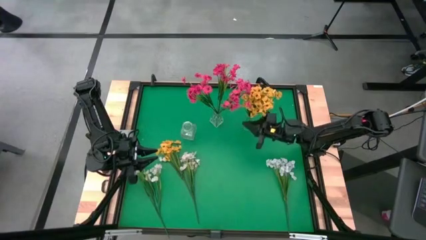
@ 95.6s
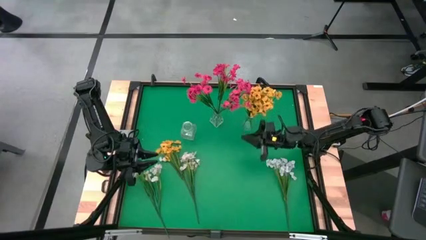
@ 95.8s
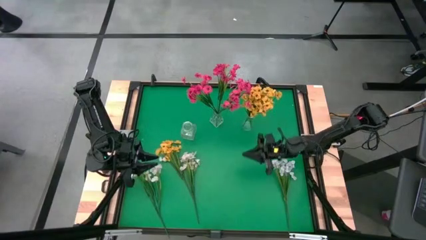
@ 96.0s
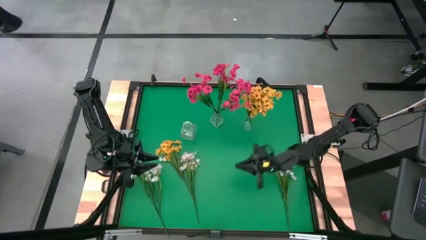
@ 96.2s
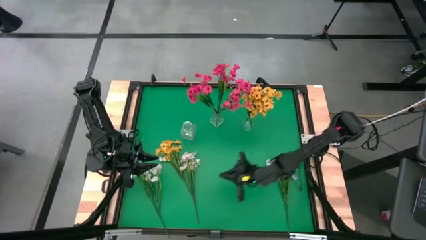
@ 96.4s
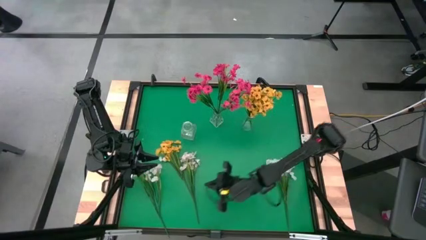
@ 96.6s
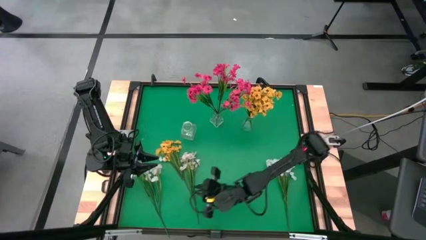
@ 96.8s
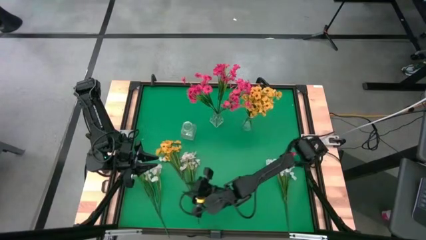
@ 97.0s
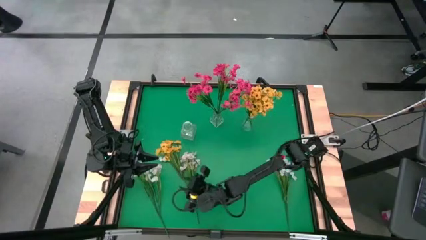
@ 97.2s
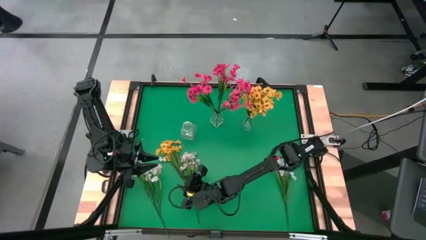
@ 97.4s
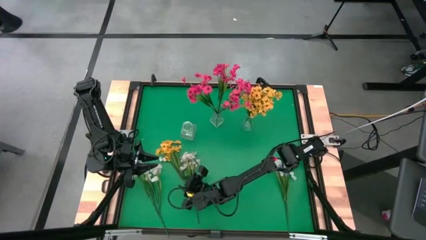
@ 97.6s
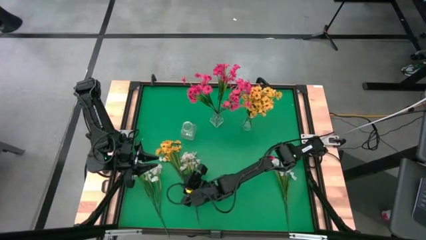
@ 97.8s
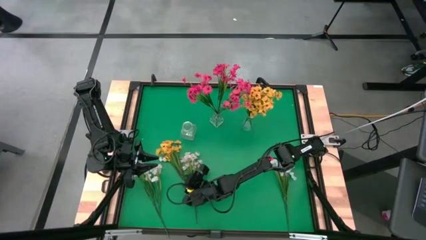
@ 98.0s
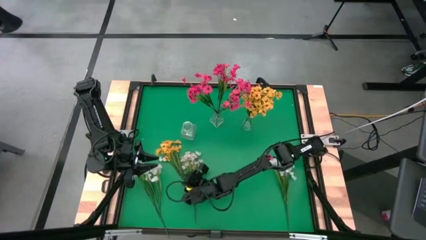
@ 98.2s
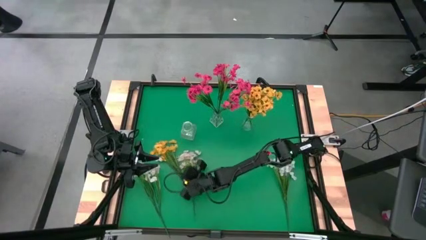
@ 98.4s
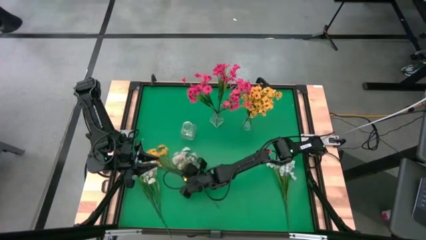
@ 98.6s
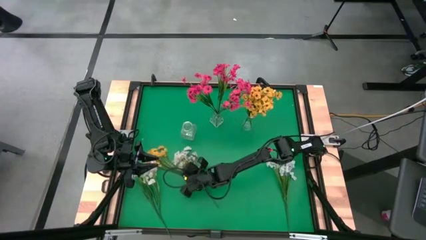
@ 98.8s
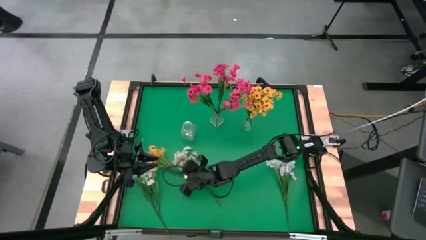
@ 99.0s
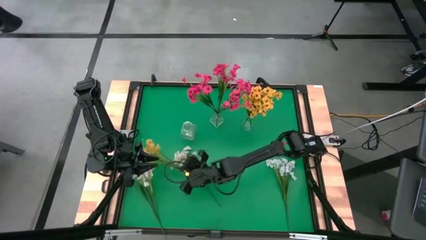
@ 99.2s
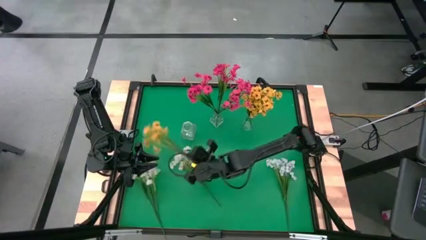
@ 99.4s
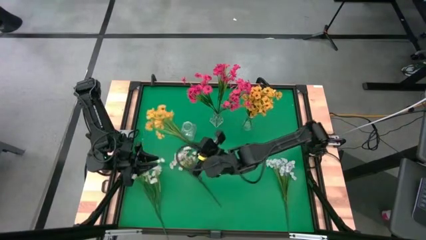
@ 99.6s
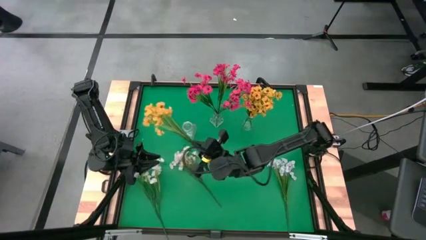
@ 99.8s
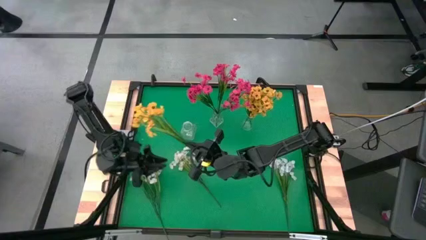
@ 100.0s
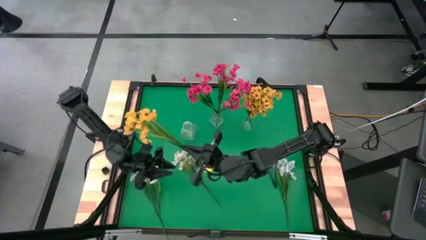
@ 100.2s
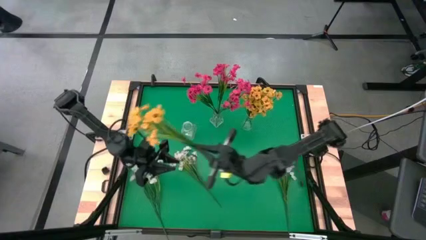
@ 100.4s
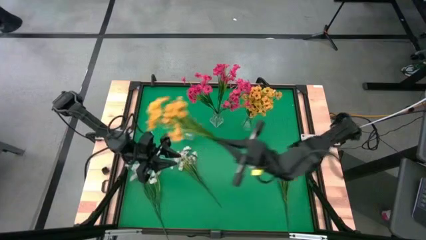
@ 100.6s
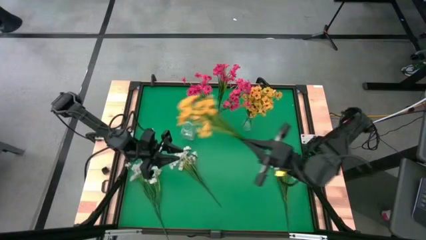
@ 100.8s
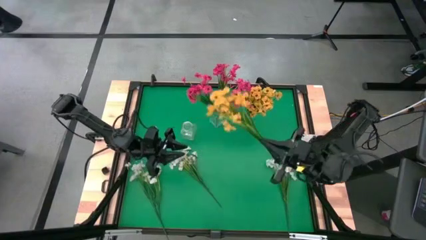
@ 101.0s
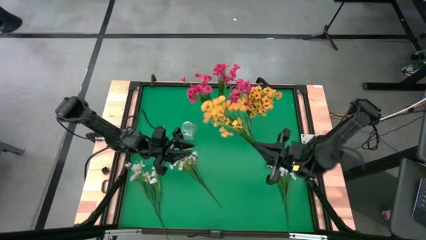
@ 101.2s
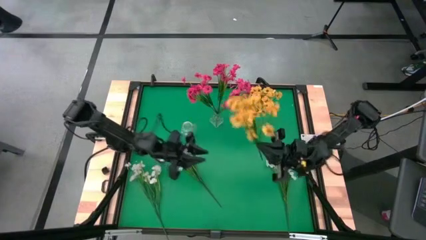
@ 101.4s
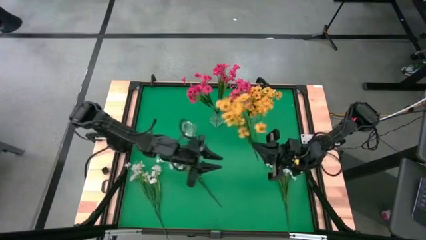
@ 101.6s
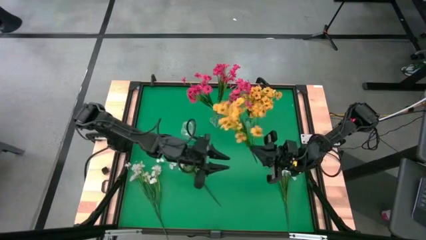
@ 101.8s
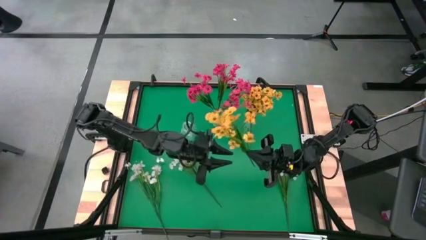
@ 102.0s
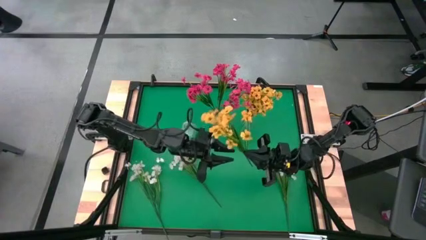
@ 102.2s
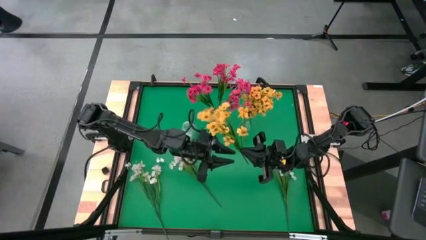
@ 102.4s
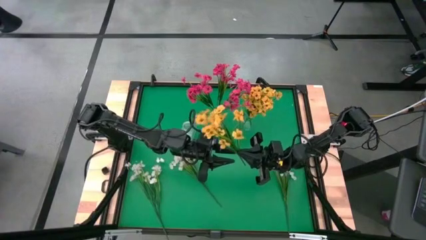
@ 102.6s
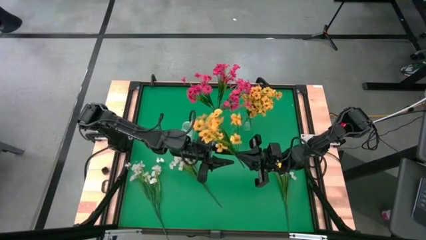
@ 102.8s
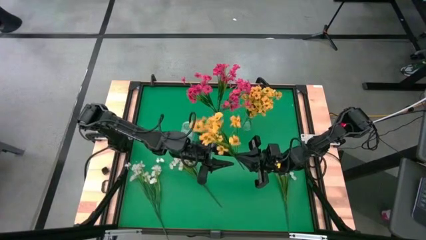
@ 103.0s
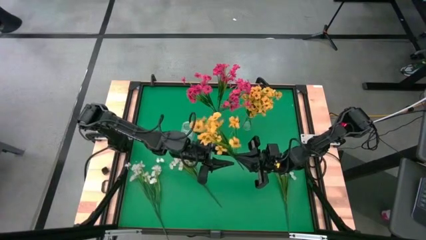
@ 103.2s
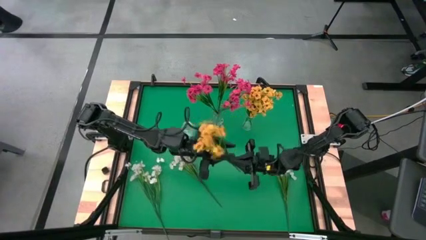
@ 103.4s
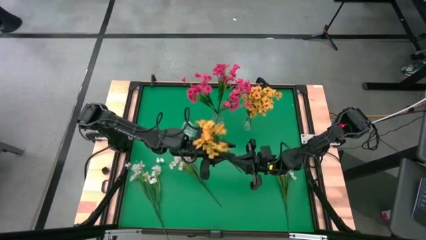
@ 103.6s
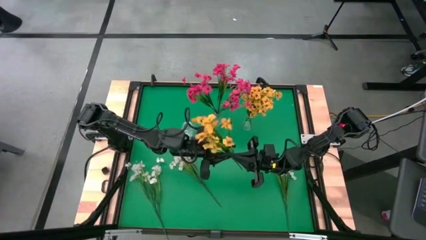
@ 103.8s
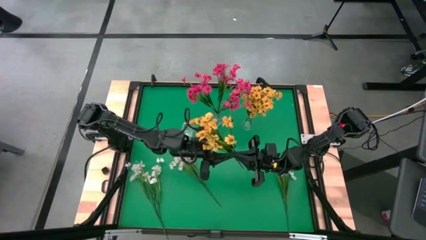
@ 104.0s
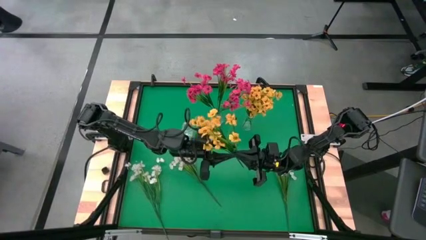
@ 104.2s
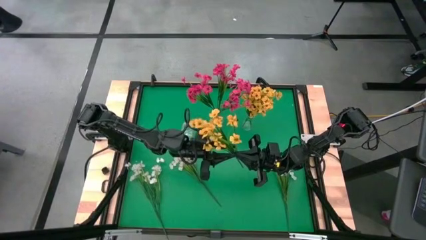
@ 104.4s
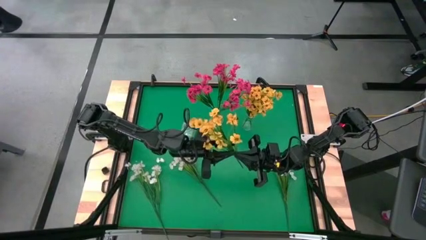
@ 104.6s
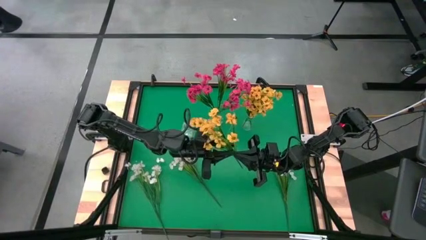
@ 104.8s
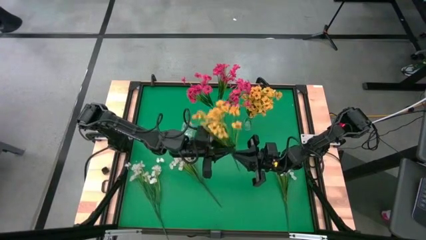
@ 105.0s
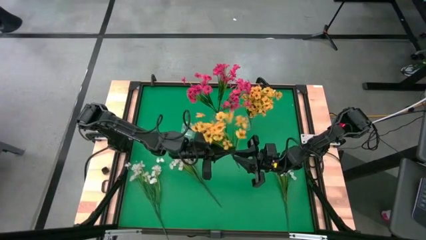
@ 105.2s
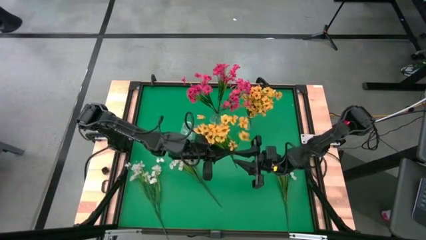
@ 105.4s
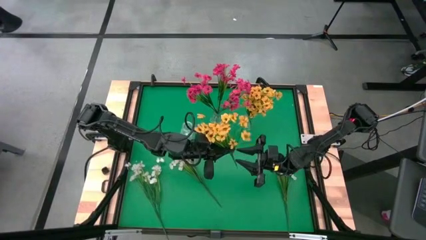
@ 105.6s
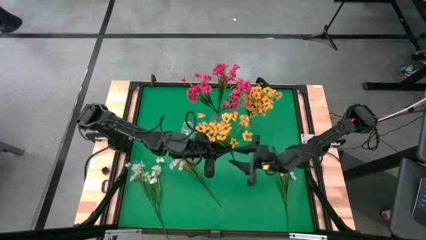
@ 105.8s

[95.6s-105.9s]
Task: Sort flowers into vase by color
Put the yellow flower into the right transparent vase
